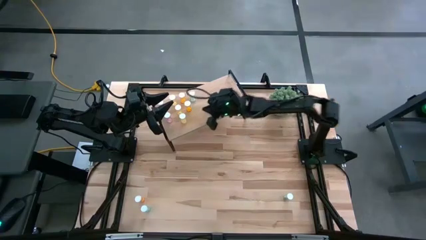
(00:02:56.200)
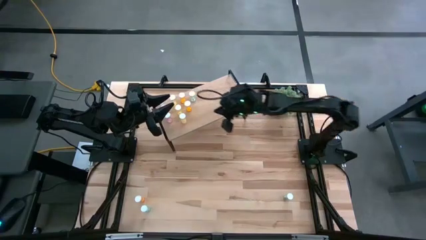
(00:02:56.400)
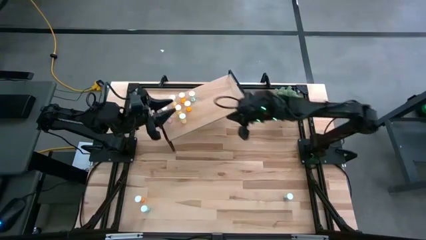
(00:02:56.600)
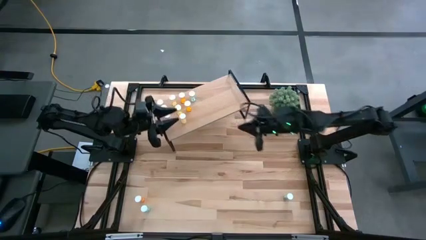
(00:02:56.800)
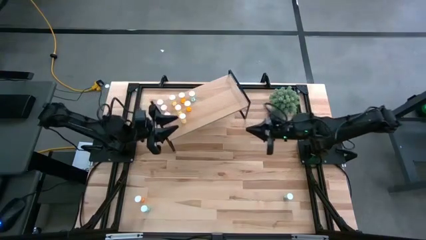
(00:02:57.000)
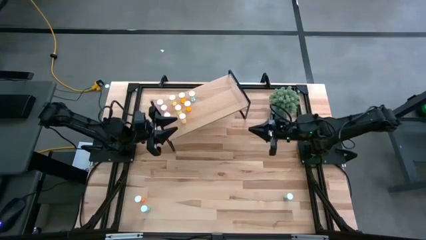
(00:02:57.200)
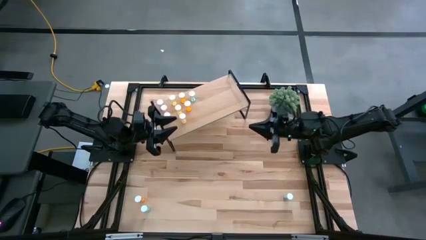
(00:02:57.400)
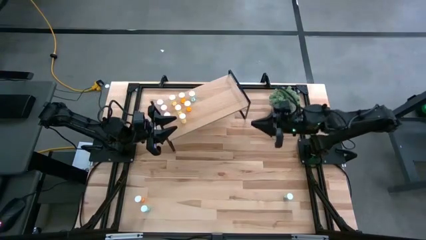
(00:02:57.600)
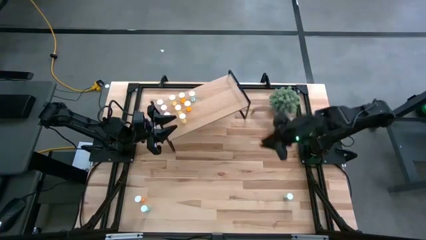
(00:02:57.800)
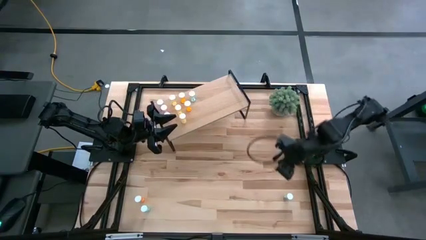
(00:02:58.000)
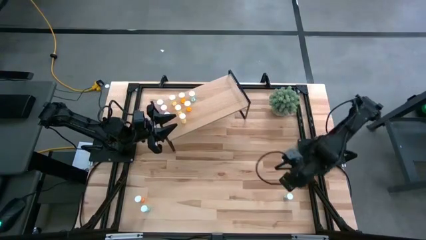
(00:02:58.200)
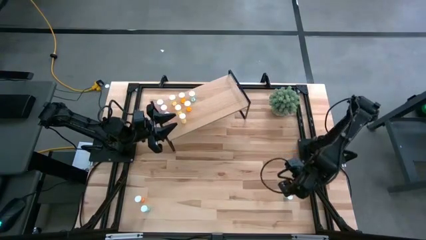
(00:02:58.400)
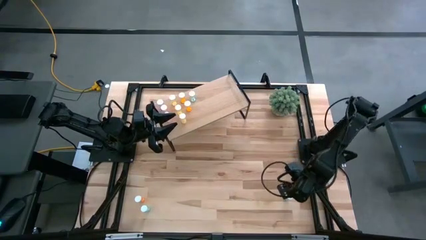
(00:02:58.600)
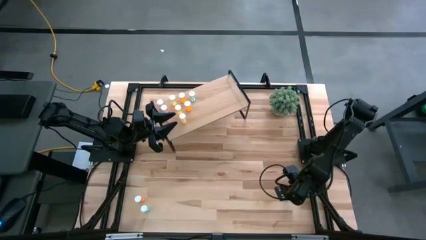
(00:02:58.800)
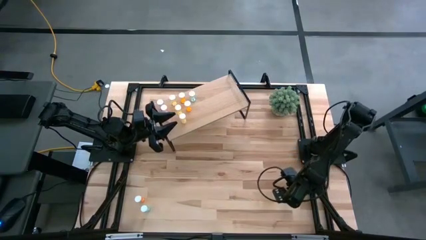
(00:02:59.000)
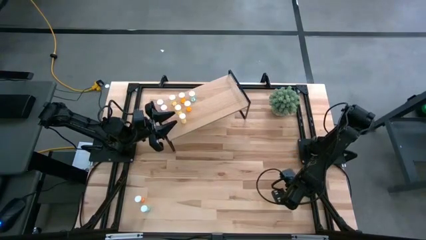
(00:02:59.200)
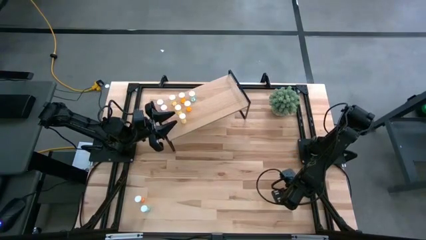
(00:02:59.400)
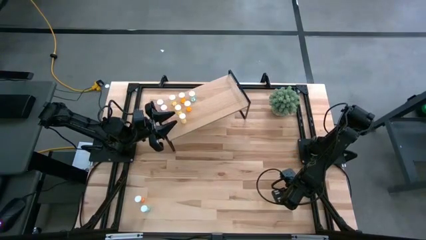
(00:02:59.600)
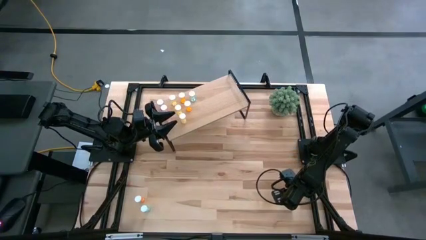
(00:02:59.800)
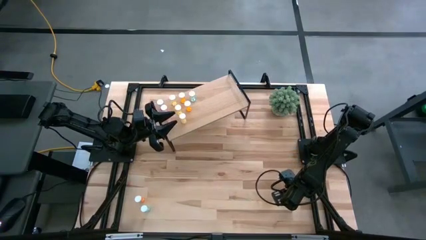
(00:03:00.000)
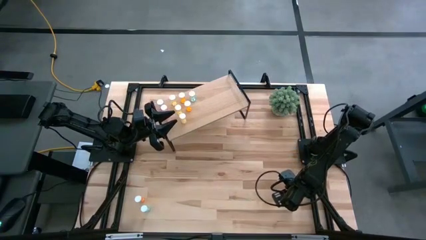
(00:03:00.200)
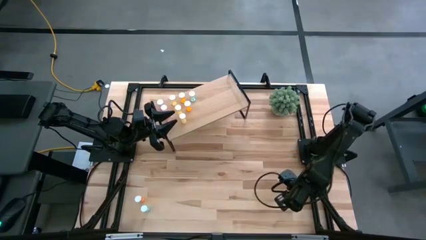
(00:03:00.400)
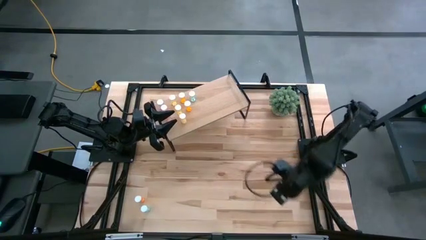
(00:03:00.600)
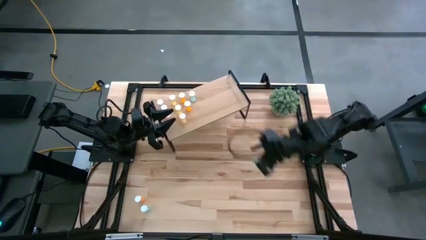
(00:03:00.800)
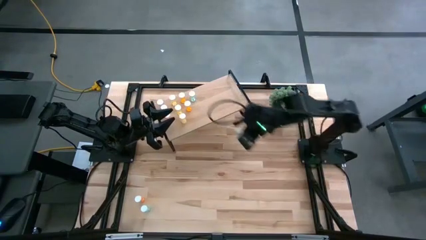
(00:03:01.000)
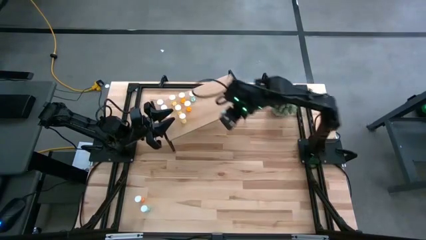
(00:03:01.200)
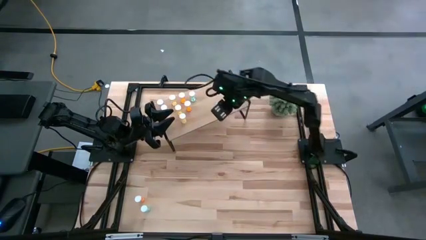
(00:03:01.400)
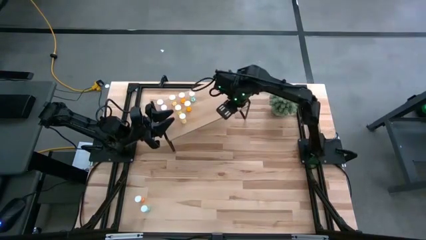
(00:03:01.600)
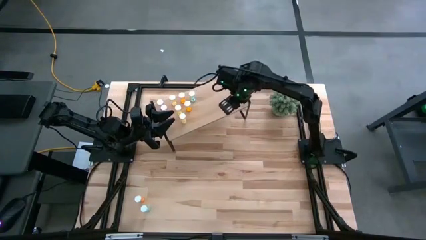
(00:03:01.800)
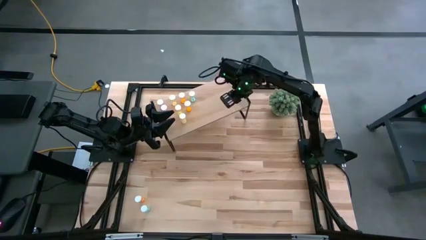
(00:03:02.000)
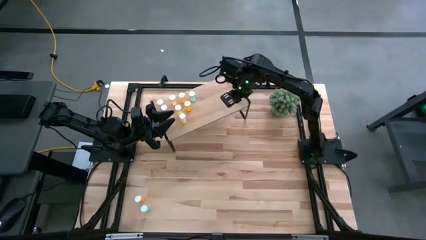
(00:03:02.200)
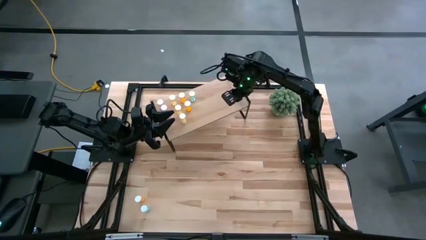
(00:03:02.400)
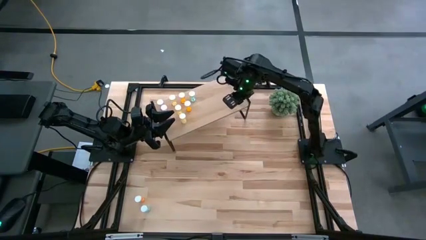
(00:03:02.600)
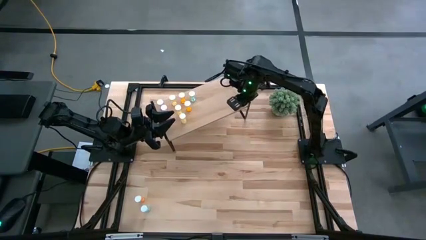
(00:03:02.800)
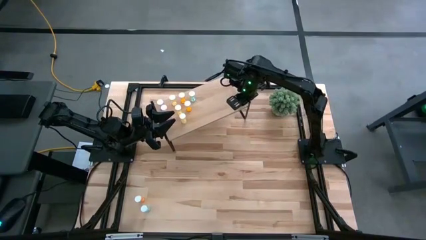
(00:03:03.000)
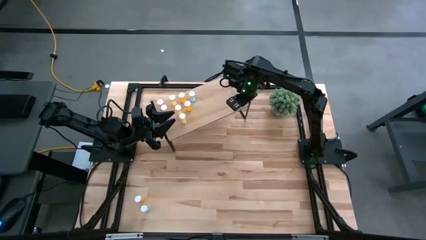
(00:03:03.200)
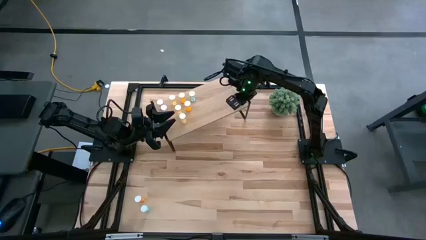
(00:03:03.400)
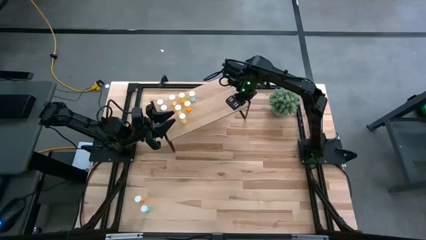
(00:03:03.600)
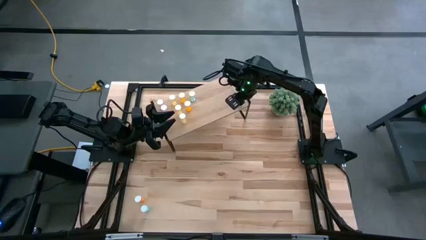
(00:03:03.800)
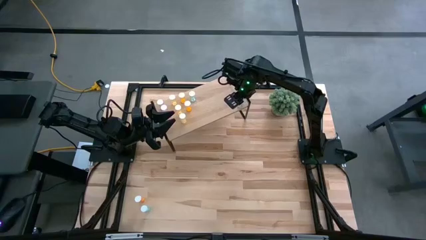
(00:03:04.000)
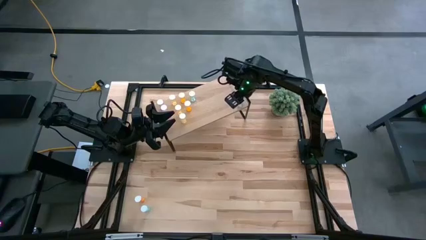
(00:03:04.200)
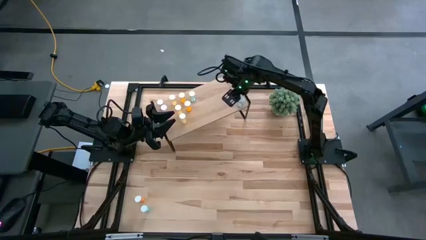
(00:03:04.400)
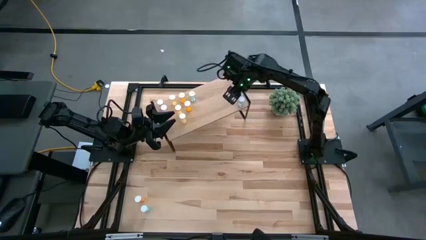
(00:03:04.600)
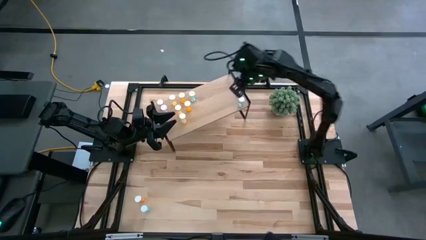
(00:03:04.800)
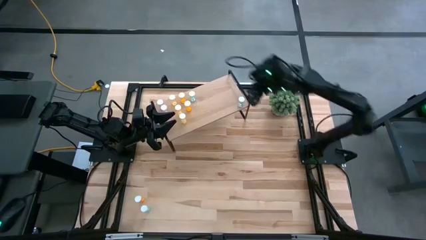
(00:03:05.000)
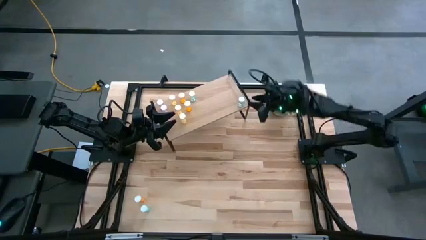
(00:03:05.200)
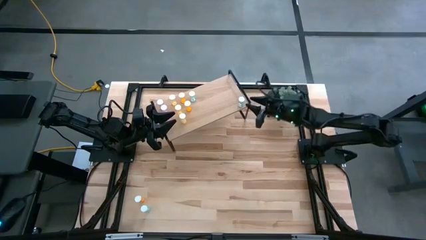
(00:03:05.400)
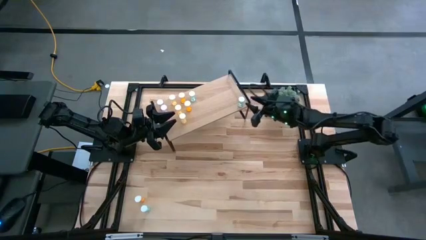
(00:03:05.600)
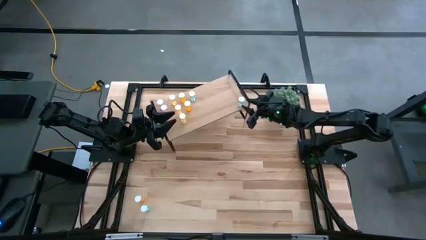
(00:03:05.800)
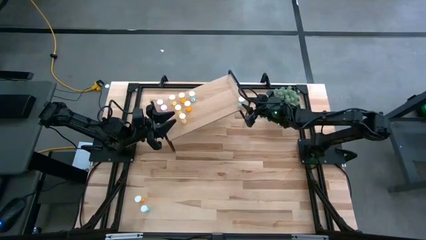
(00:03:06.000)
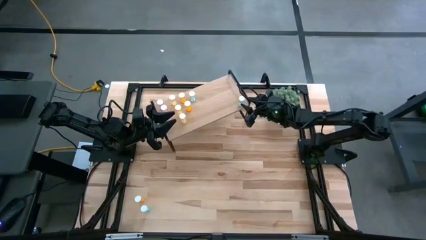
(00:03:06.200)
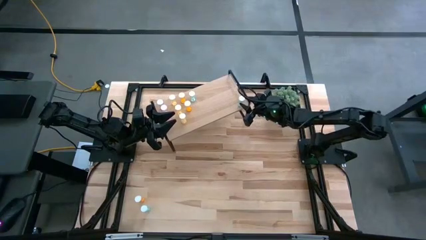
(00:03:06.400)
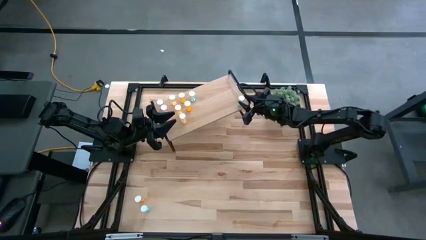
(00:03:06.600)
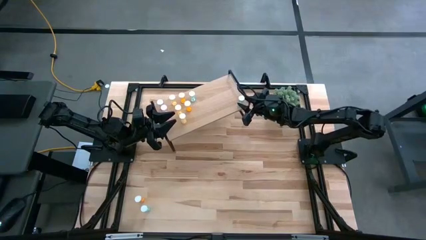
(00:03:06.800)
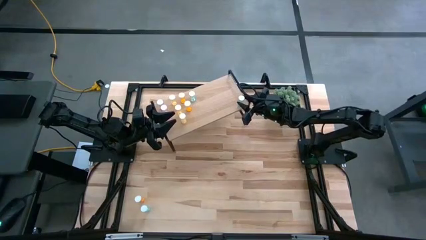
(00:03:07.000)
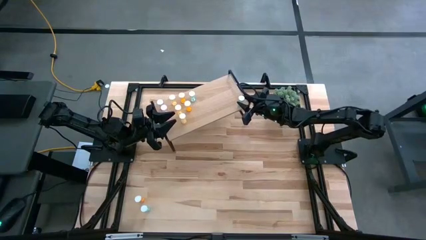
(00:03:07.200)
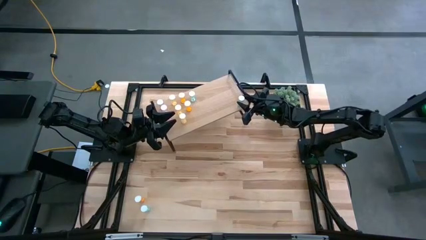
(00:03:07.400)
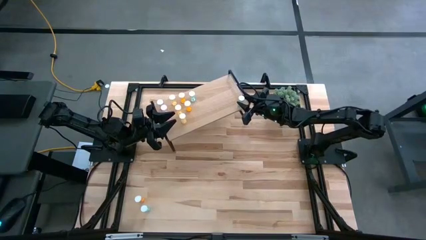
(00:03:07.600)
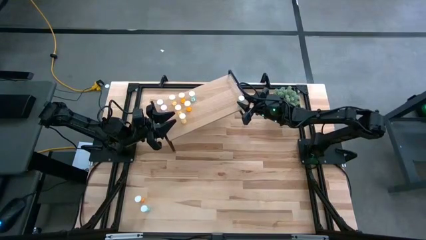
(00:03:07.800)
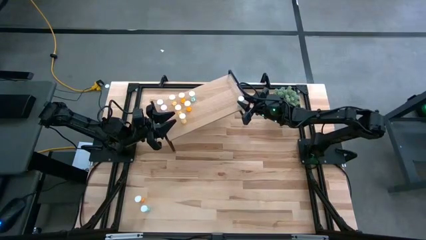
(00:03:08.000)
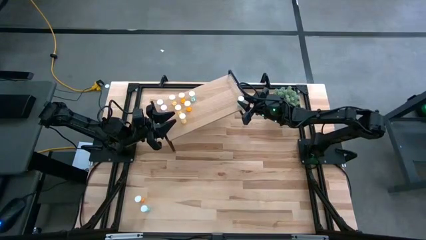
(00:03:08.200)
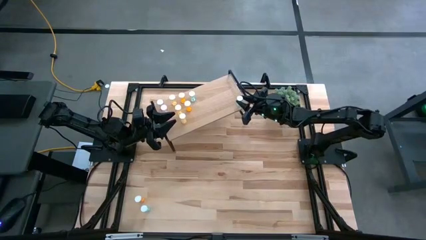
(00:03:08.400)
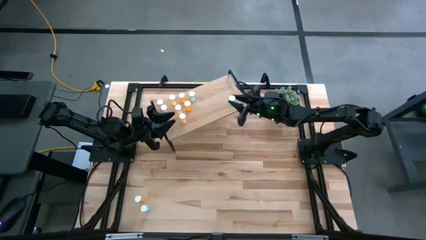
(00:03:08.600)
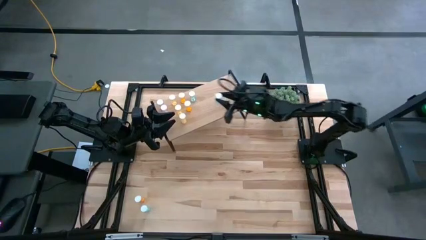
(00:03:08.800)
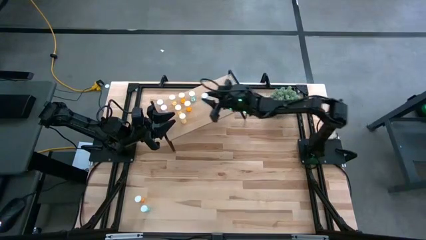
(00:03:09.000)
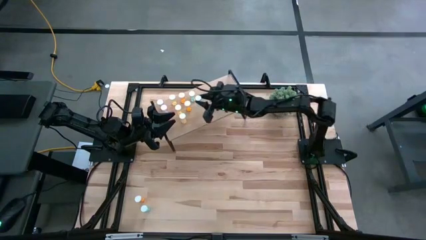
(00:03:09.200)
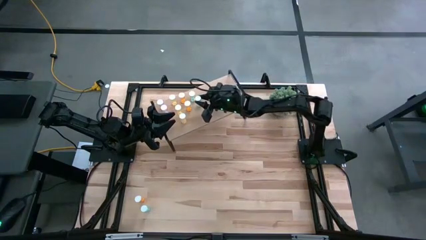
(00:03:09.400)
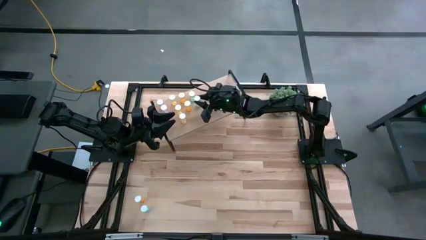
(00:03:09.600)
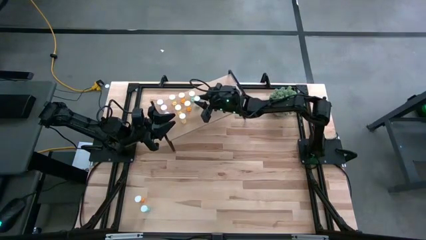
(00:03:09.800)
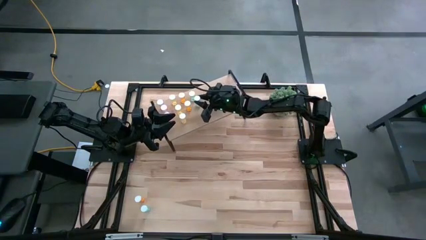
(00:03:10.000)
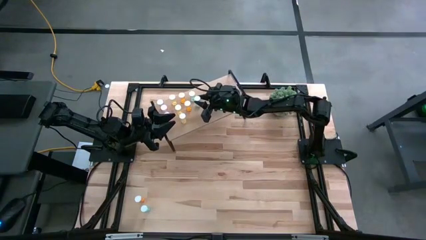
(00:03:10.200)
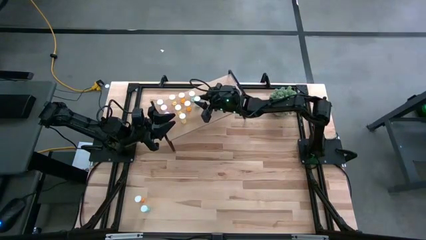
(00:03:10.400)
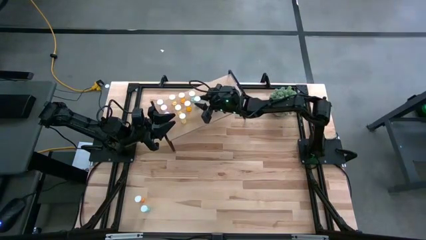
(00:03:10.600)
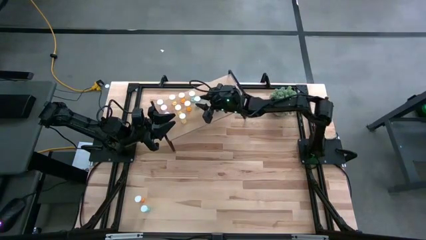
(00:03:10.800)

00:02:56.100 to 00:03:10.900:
Task: Pick and place medicine bottles onto shelf by color
Put the right blue pill bottle on the shelf aligned with the other blue pill bottle

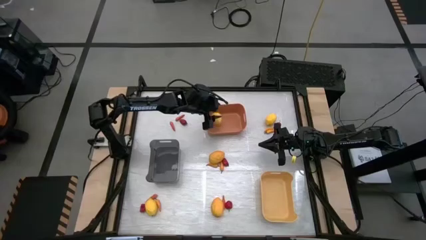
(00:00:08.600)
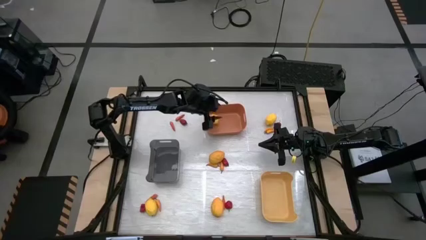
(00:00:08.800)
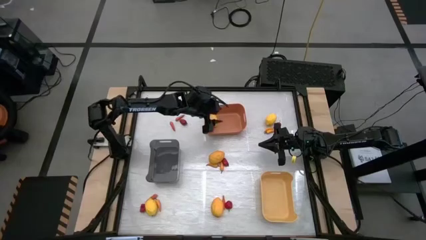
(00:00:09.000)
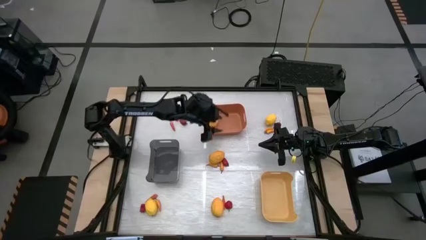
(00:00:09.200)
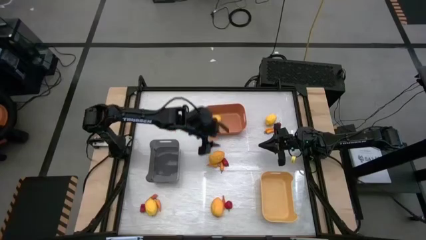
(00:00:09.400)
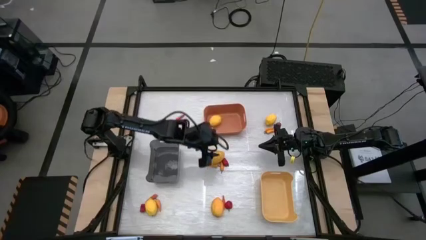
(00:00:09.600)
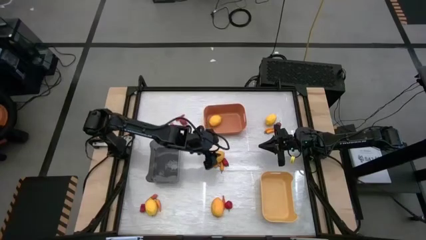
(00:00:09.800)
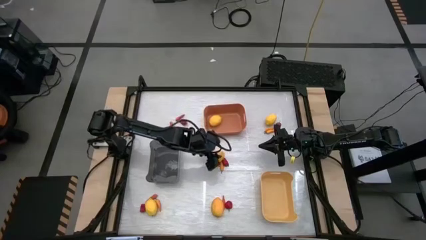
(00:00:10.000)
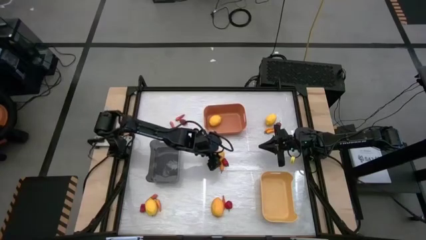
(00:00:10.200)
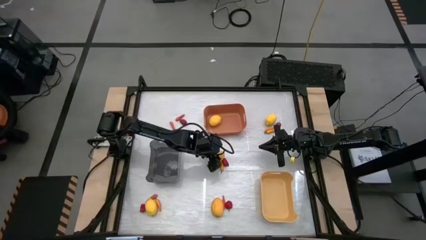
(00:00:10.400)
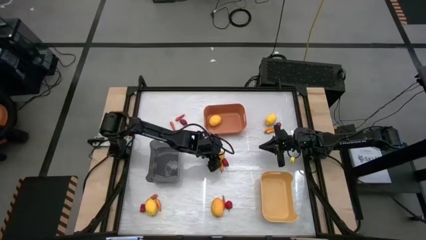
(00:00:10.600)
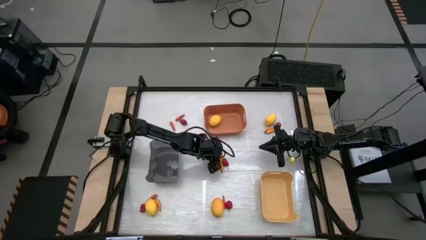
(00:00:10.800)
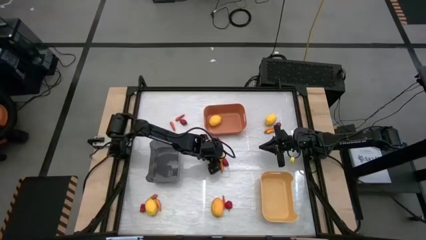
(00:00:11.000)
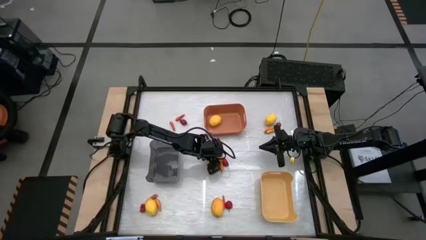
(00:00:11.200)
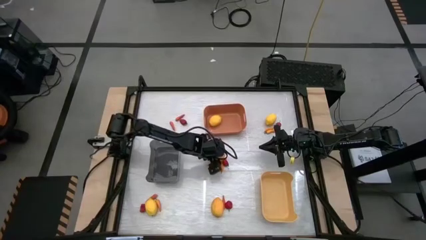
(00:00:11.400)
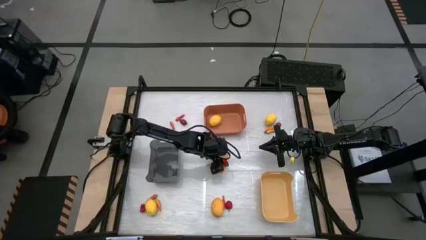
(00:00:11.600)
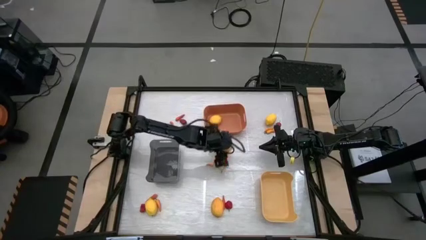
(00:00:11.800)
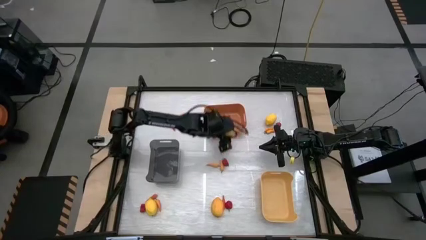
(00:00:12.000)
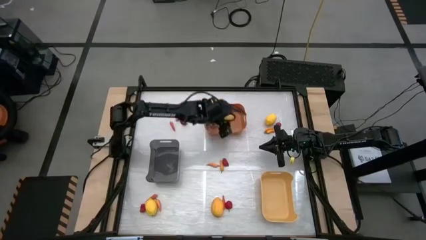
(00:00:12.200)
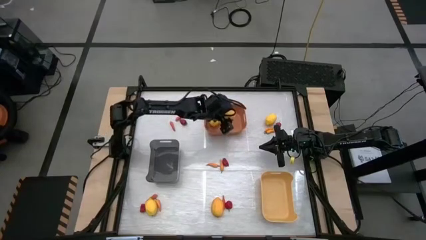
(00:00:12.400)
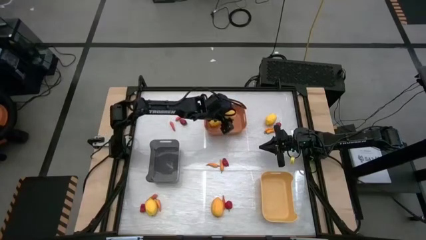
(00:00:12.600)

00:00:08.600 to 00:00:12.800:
Task: Sort produce into baskets
Put the lemon into the orange bin
